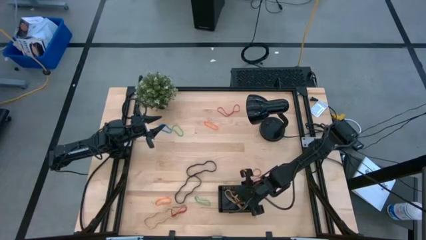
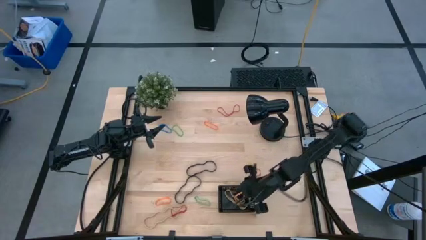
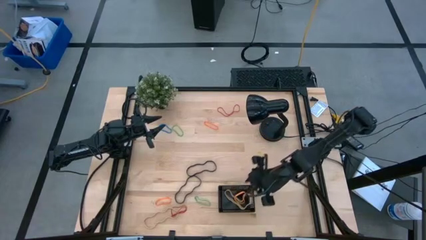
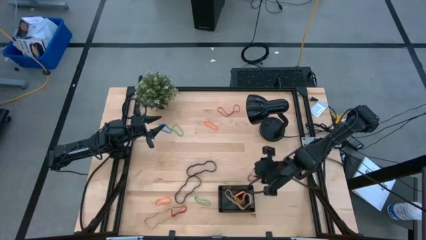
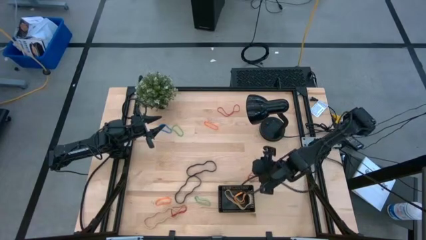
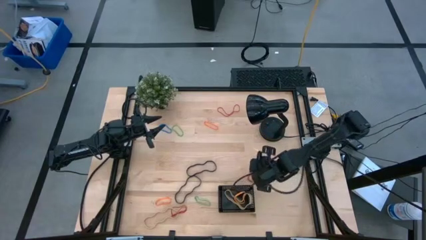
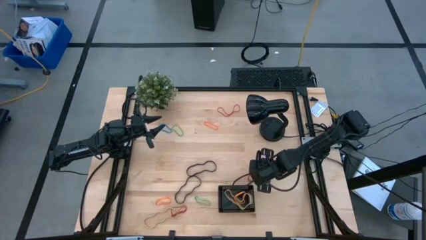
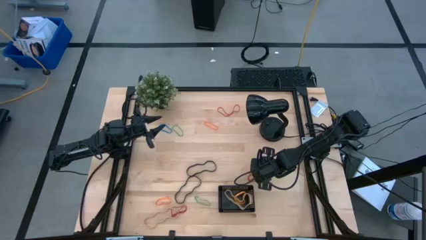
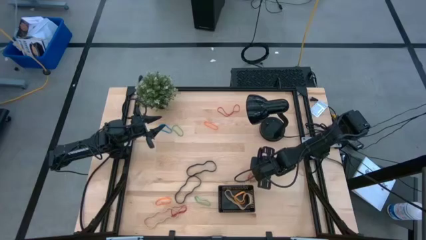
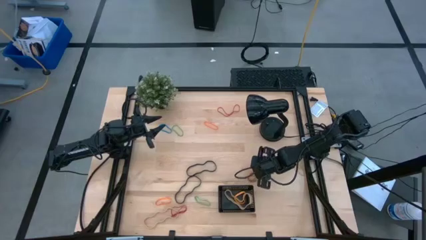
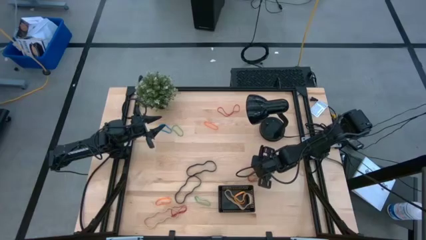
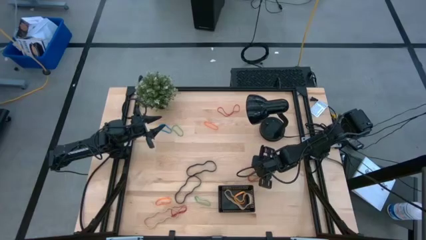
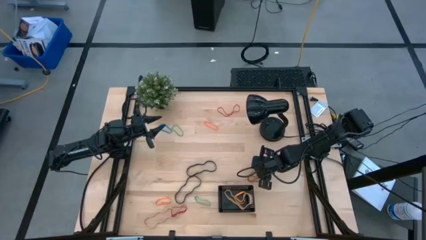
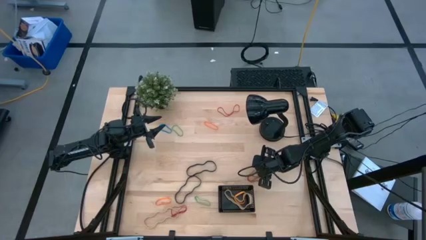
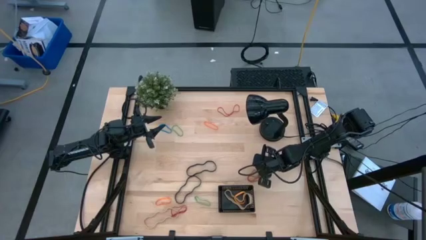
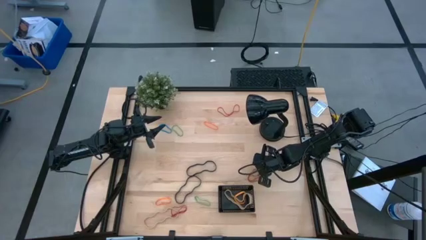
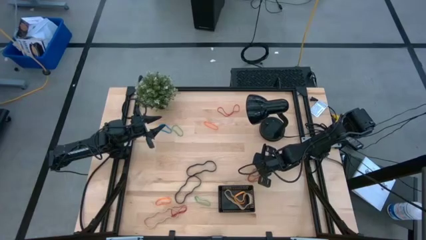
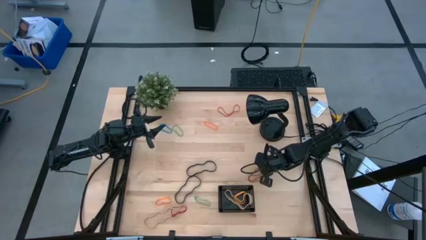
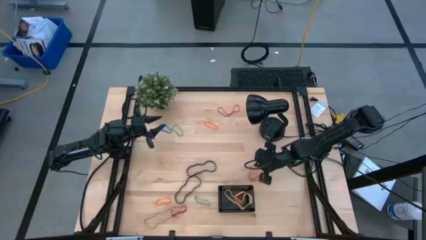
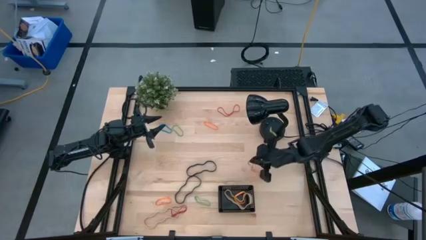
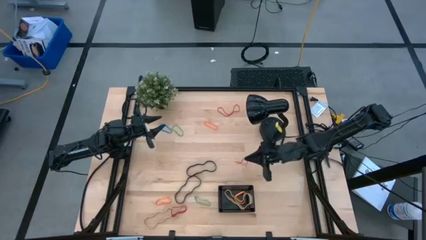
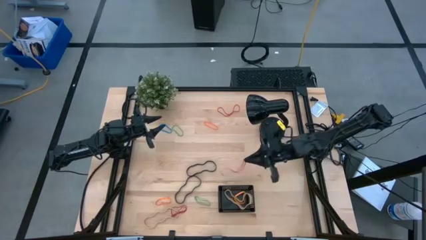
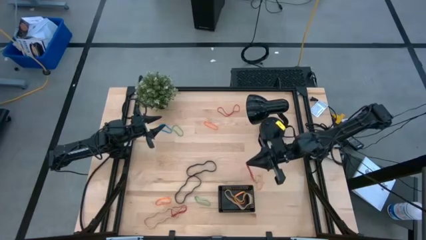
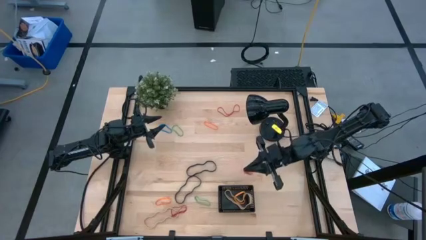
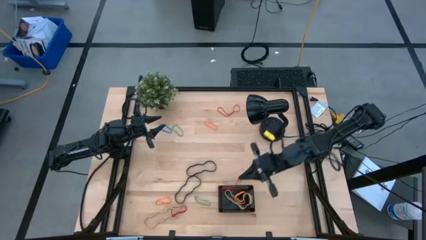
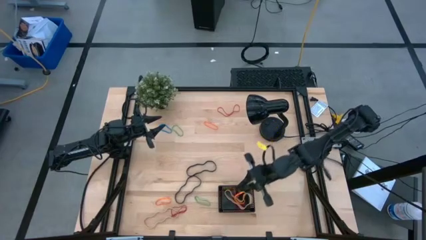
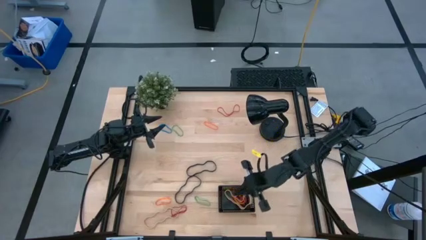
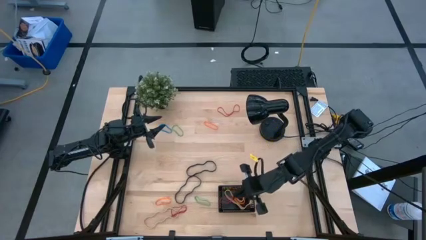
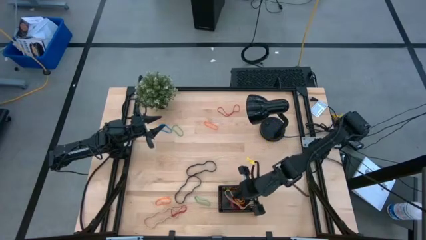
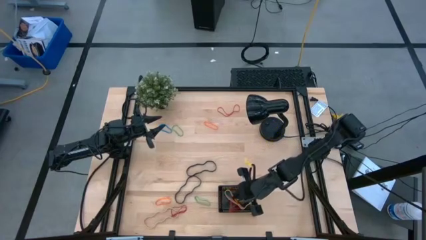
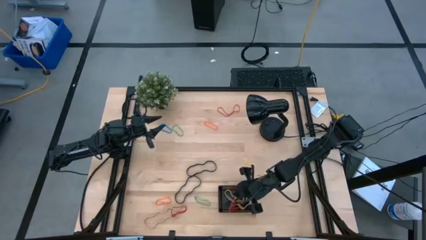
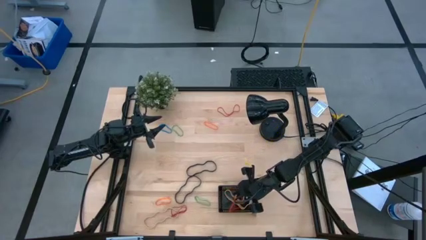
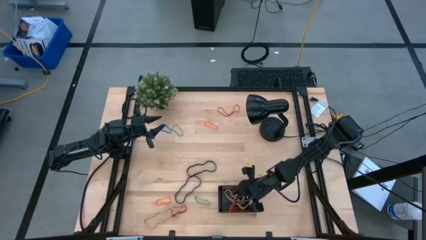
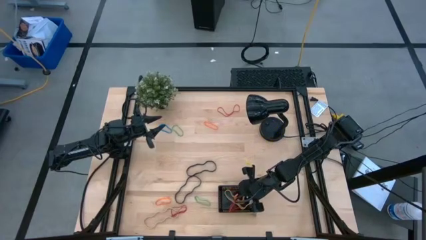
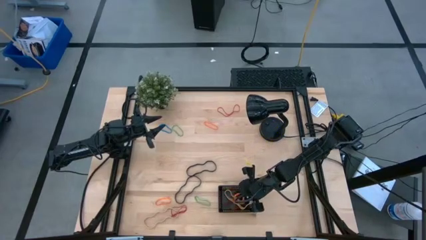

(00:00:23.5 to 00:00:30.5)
Task: Pick and place rubber bands into bin
Put the middle red rubber band into the black bin

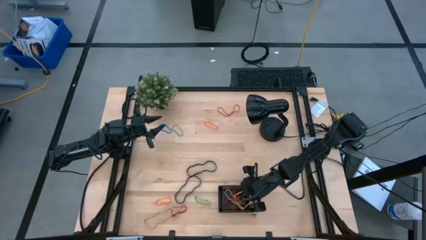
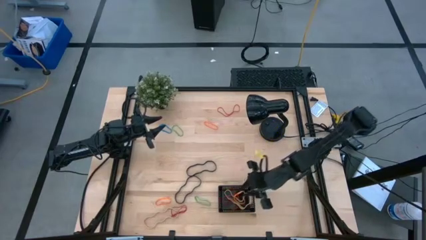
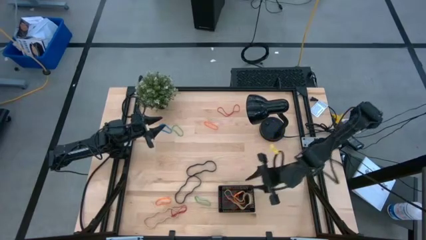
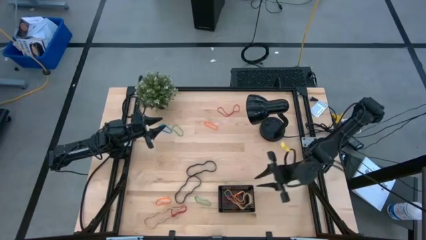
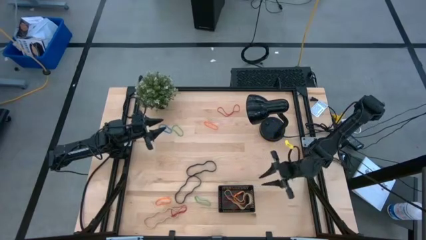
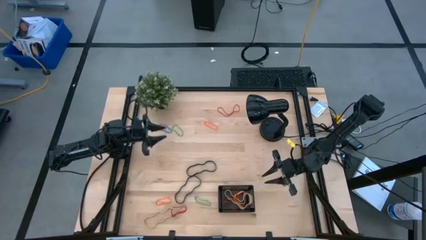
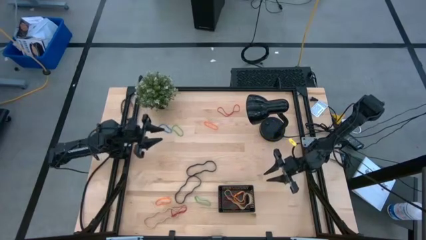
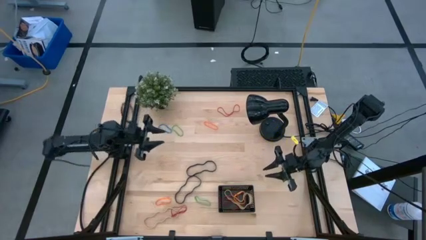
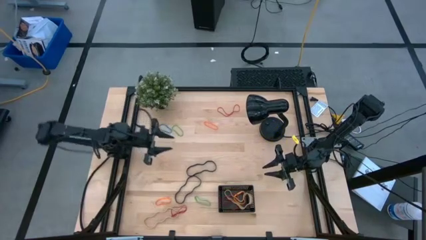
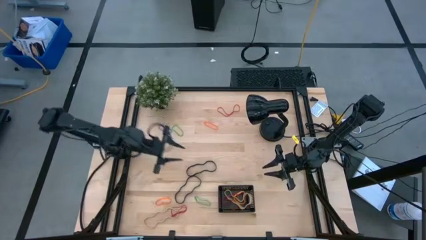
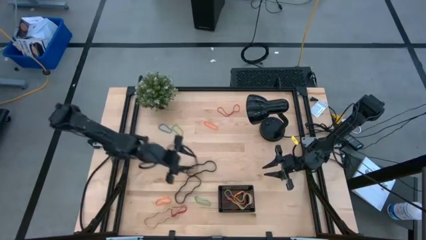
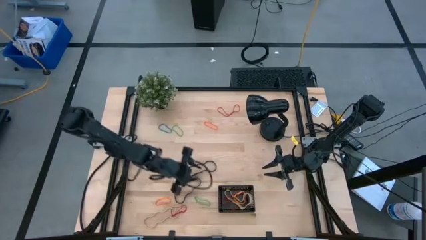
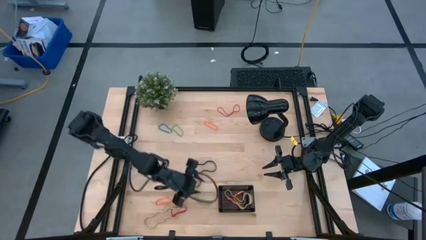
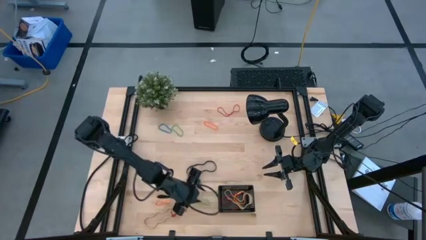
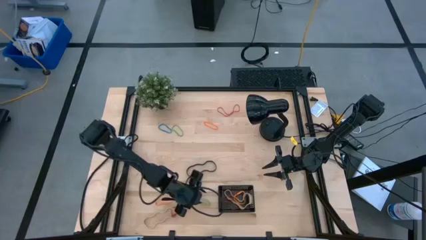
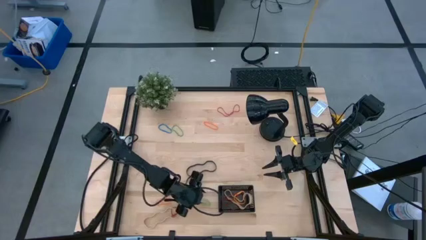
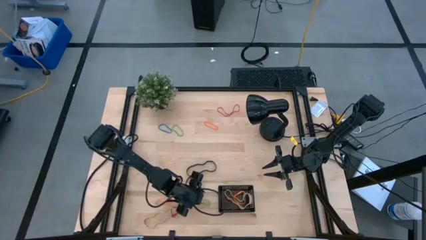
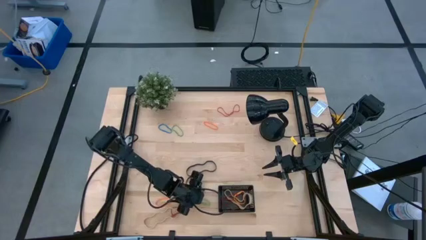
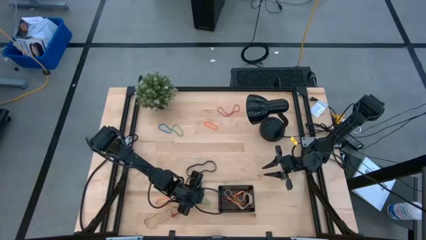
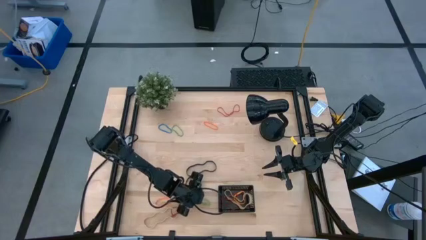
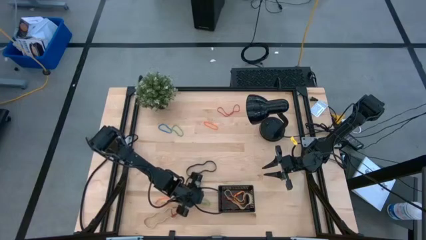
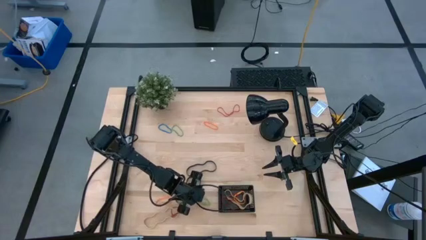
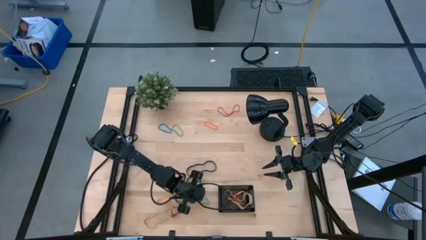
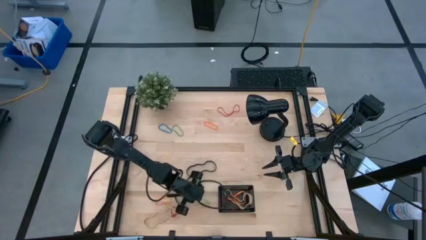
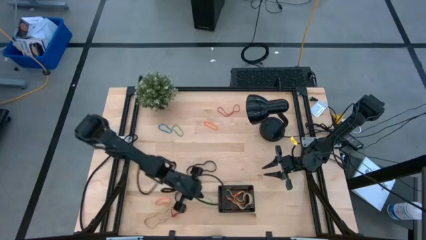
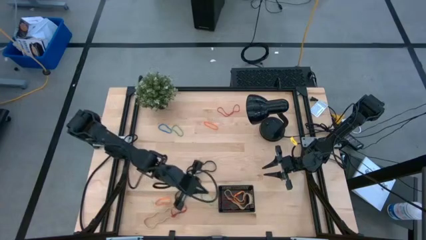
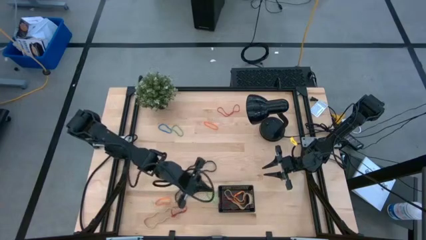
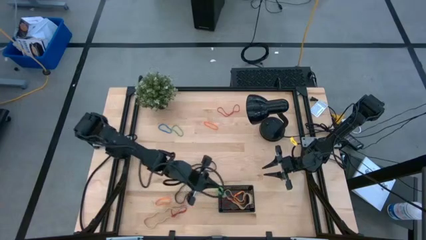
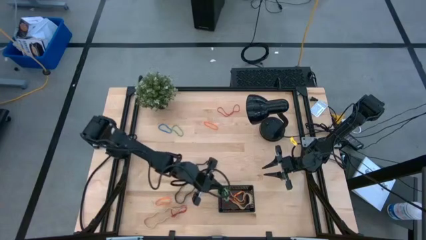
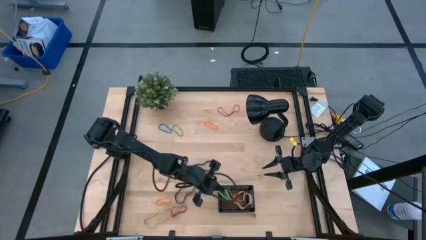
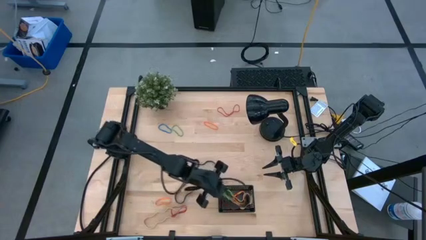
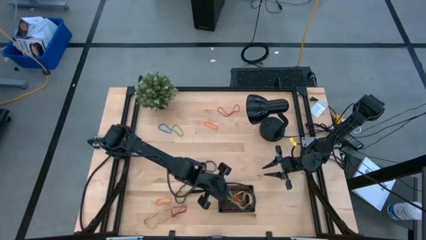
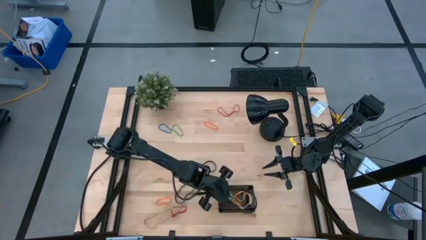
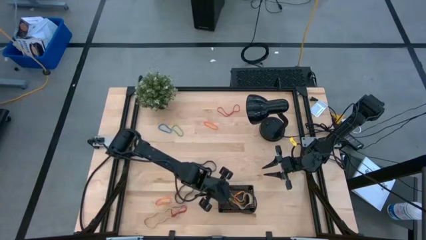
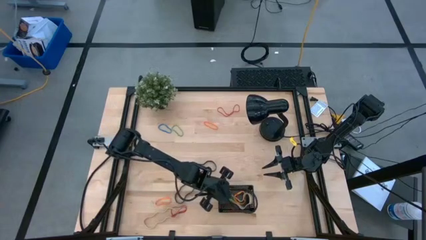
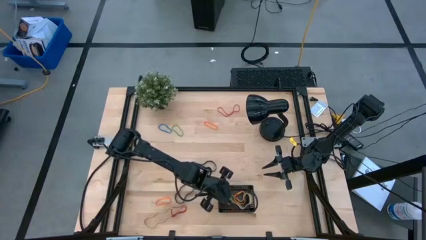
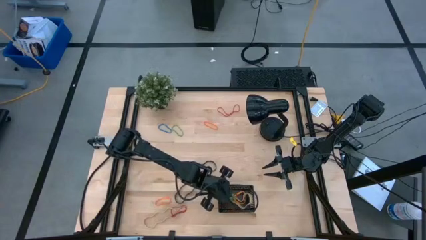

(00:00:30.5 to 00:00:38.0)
Put the bottom green rubber band into the black bin
